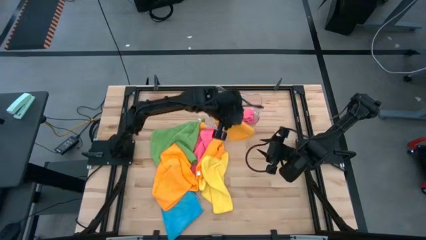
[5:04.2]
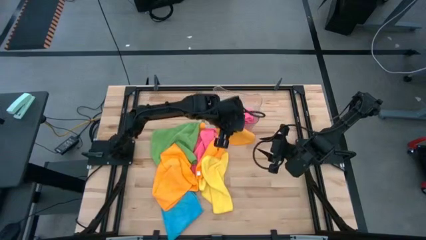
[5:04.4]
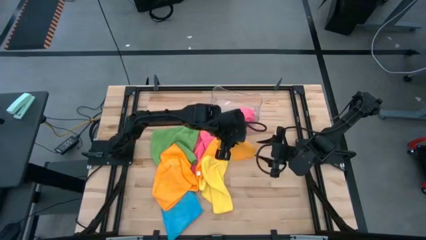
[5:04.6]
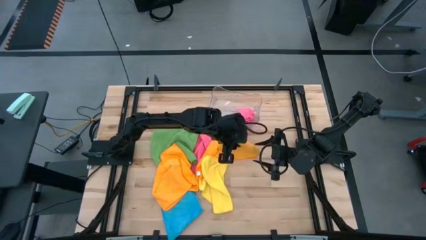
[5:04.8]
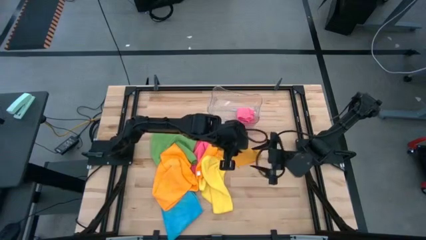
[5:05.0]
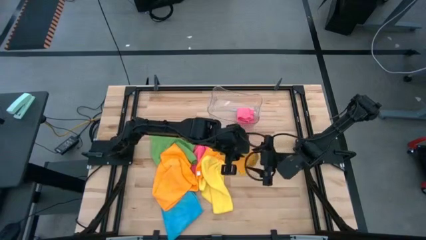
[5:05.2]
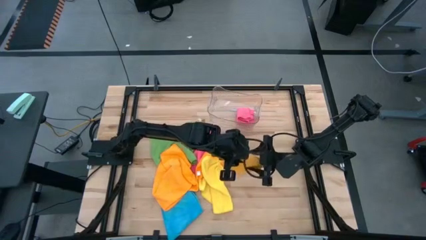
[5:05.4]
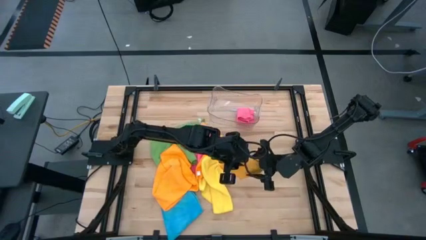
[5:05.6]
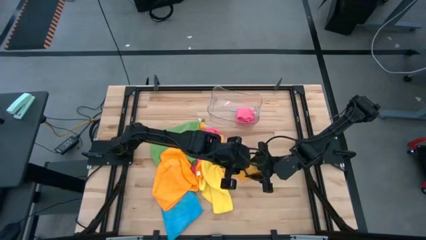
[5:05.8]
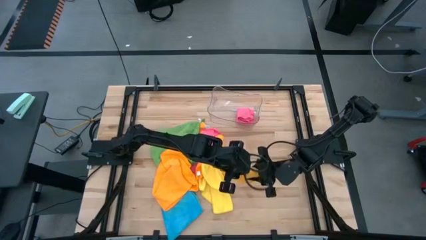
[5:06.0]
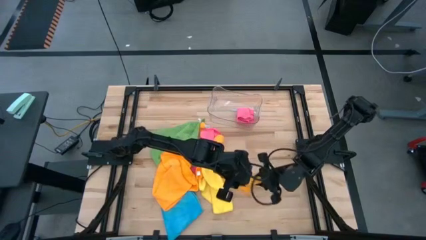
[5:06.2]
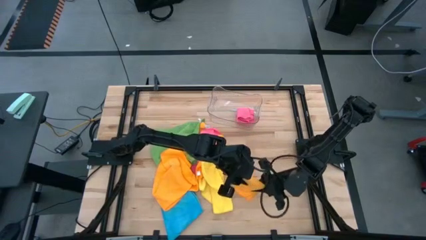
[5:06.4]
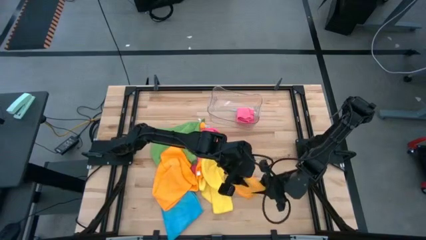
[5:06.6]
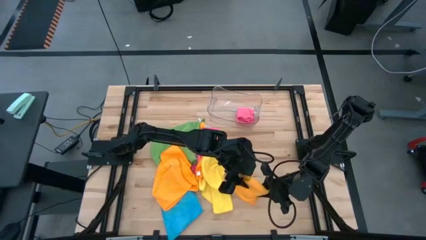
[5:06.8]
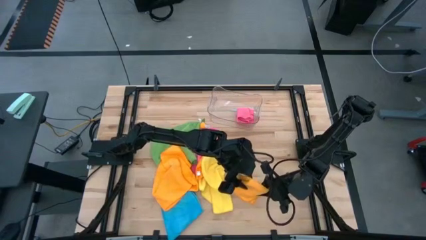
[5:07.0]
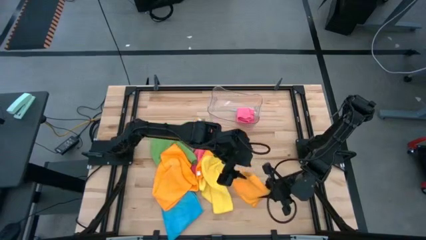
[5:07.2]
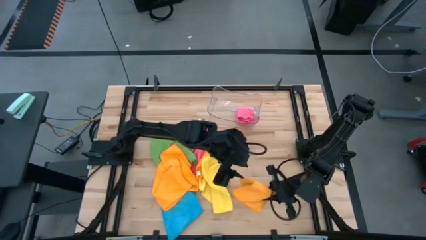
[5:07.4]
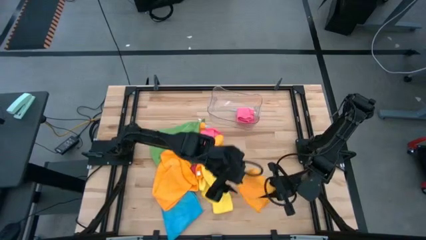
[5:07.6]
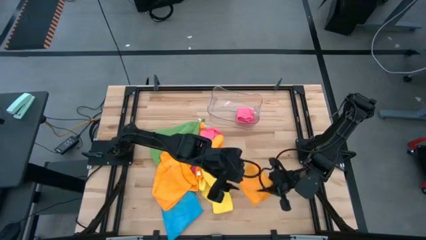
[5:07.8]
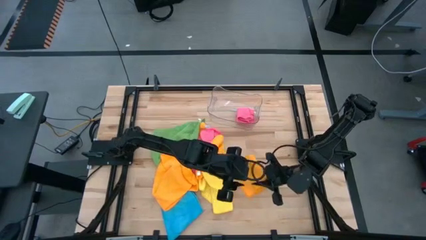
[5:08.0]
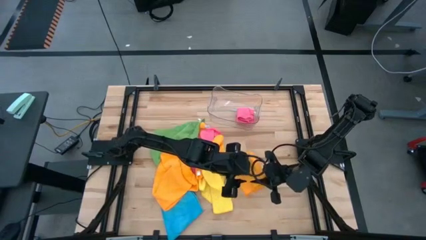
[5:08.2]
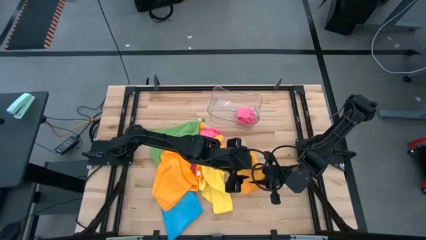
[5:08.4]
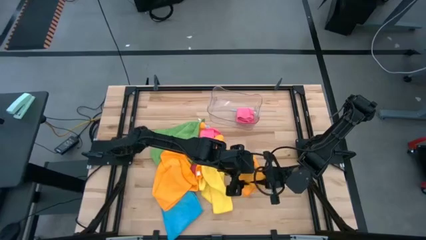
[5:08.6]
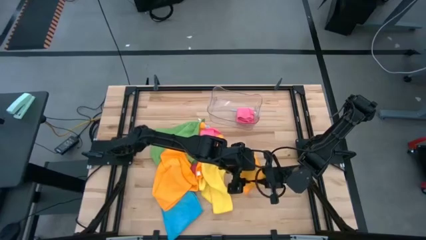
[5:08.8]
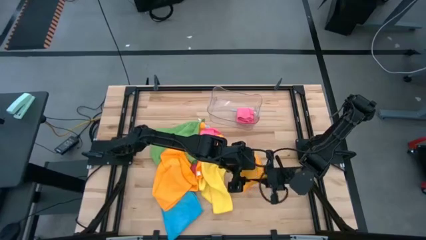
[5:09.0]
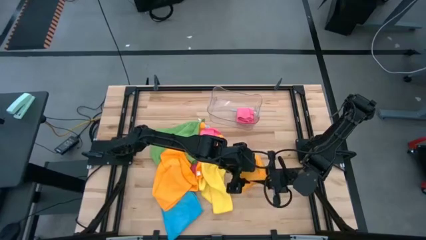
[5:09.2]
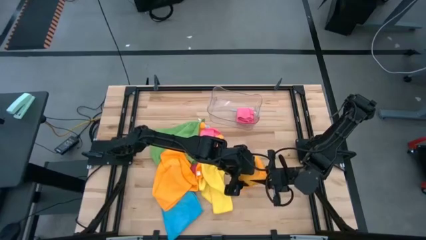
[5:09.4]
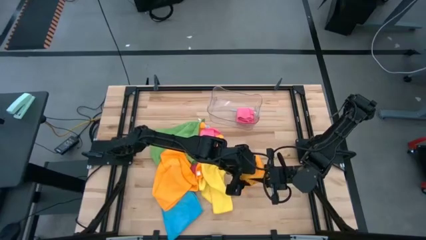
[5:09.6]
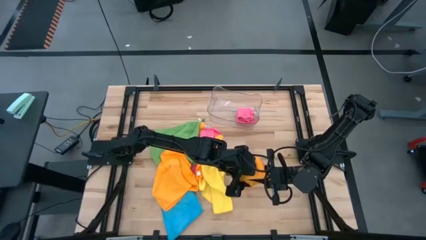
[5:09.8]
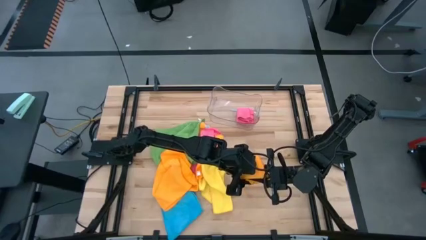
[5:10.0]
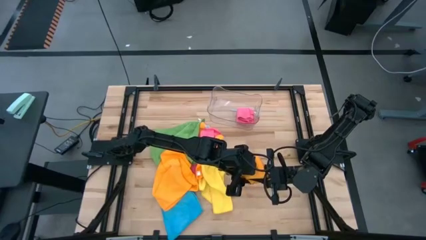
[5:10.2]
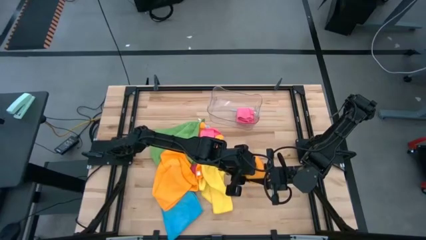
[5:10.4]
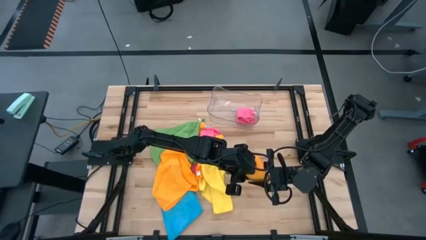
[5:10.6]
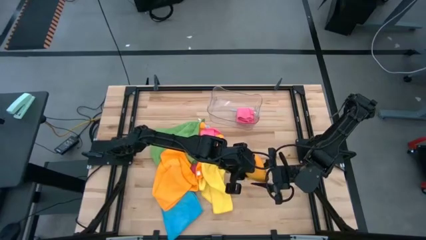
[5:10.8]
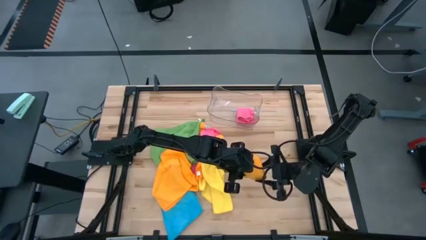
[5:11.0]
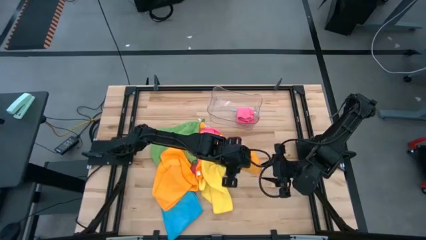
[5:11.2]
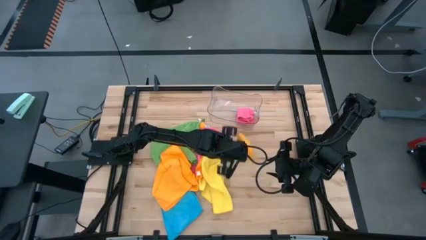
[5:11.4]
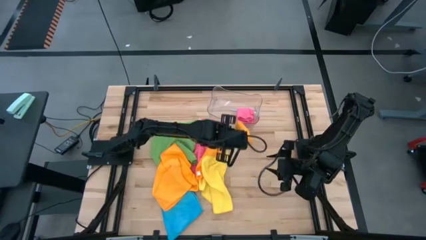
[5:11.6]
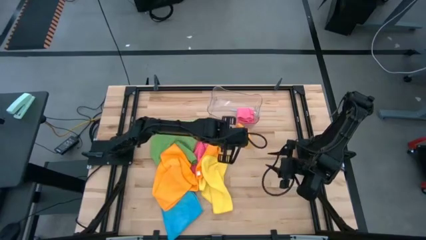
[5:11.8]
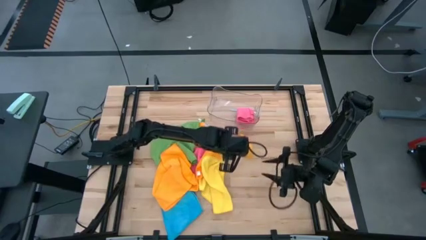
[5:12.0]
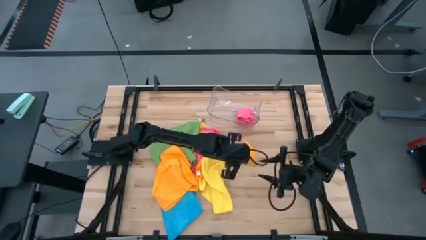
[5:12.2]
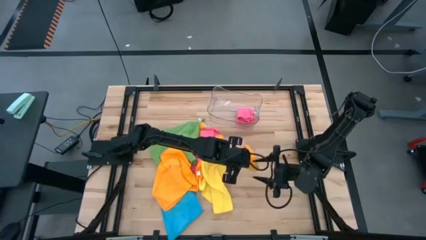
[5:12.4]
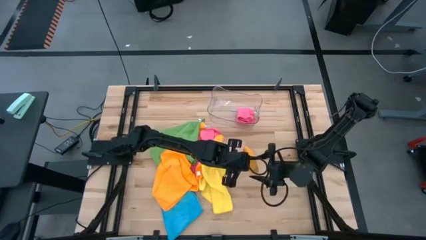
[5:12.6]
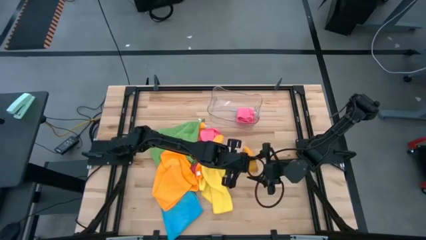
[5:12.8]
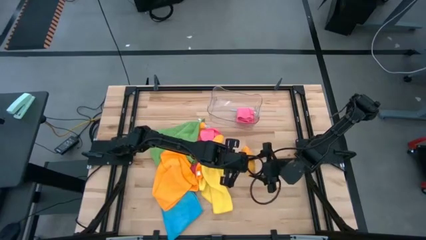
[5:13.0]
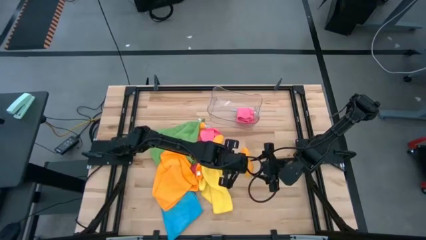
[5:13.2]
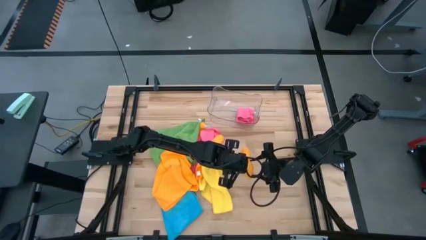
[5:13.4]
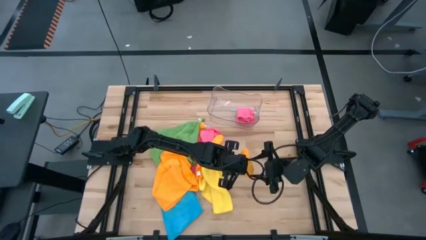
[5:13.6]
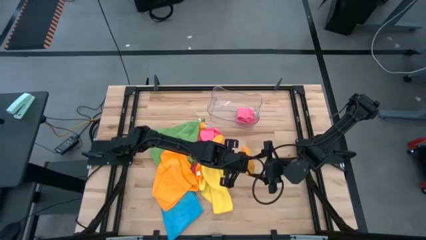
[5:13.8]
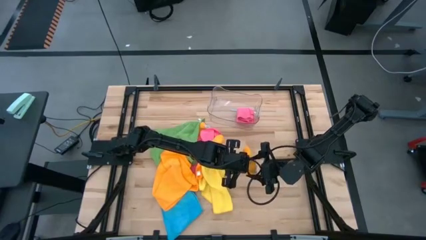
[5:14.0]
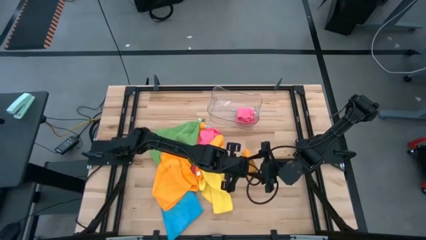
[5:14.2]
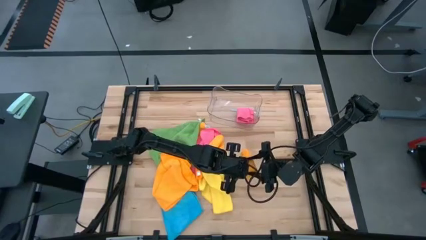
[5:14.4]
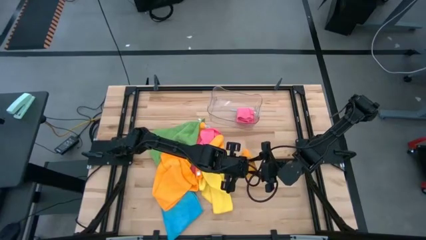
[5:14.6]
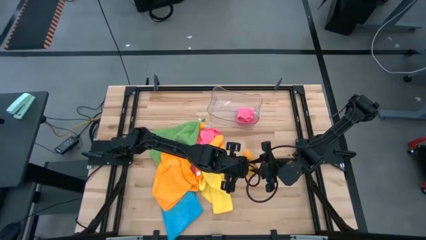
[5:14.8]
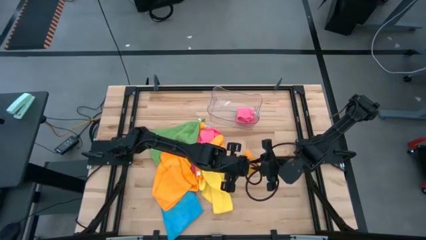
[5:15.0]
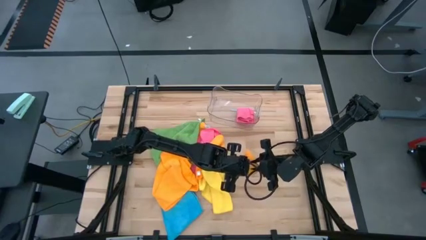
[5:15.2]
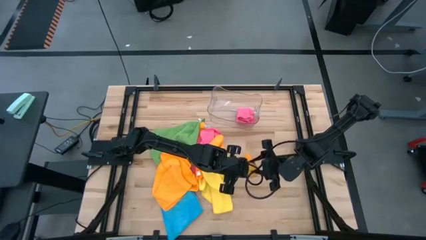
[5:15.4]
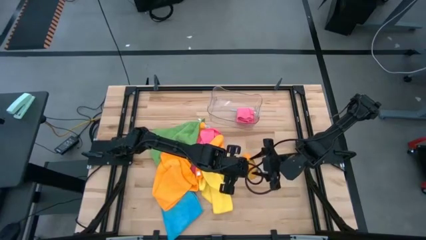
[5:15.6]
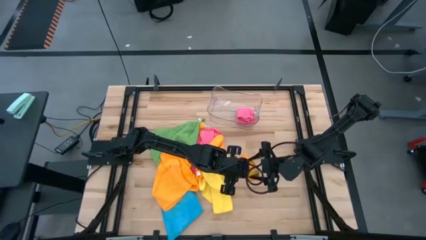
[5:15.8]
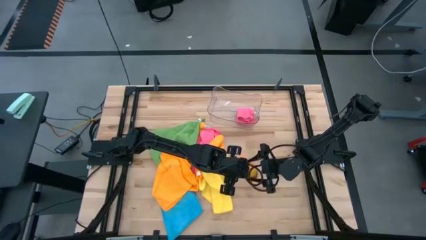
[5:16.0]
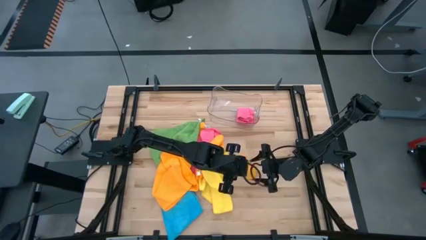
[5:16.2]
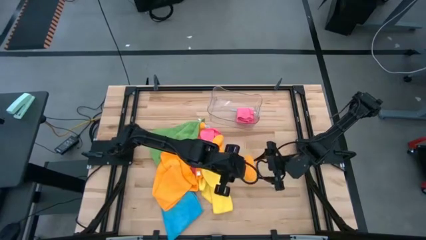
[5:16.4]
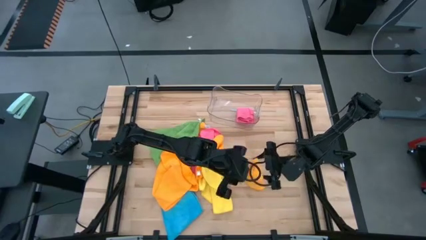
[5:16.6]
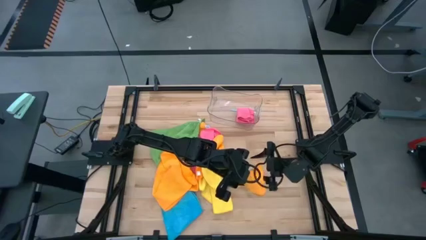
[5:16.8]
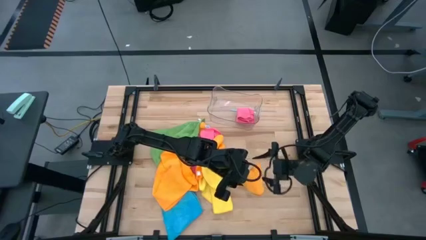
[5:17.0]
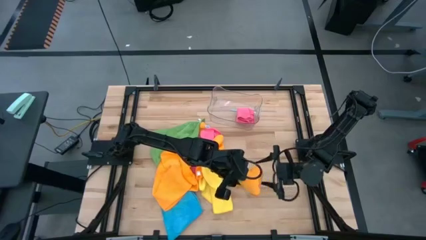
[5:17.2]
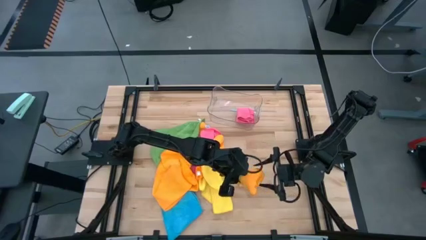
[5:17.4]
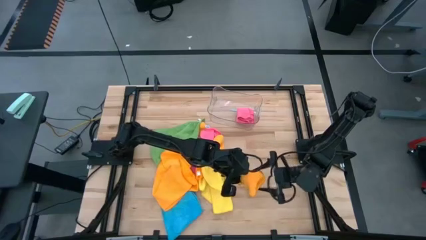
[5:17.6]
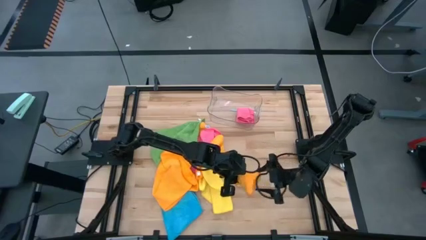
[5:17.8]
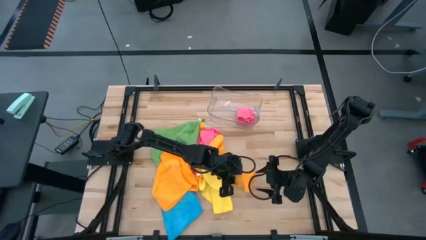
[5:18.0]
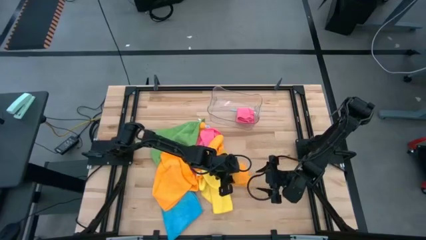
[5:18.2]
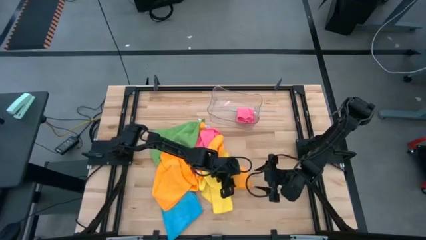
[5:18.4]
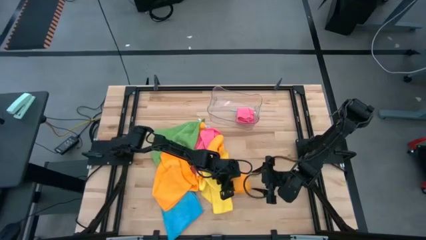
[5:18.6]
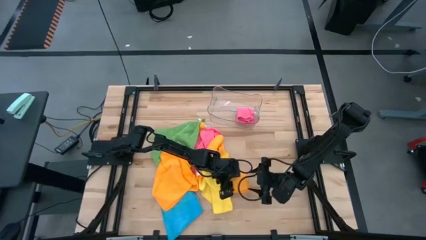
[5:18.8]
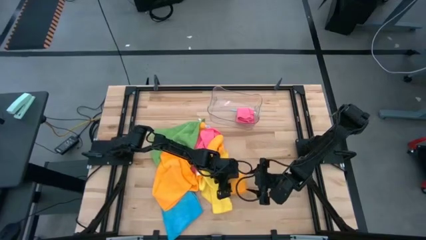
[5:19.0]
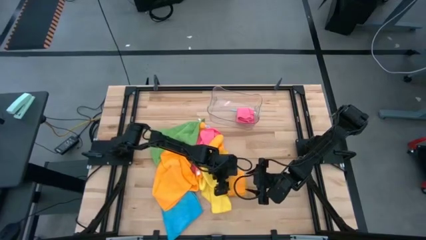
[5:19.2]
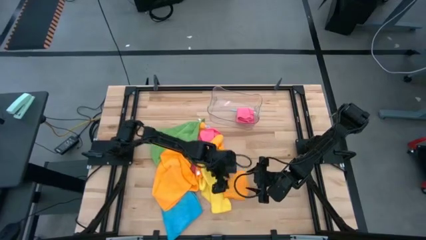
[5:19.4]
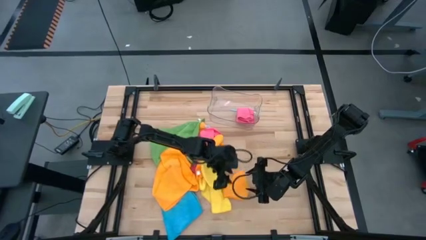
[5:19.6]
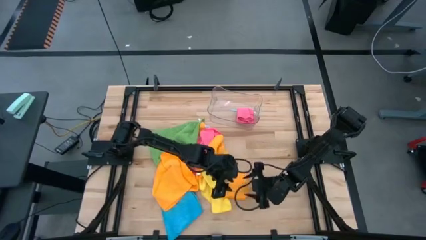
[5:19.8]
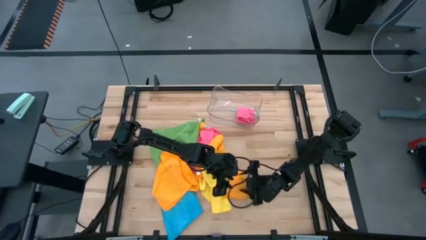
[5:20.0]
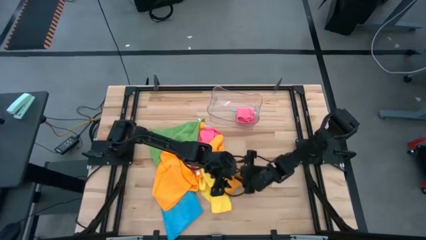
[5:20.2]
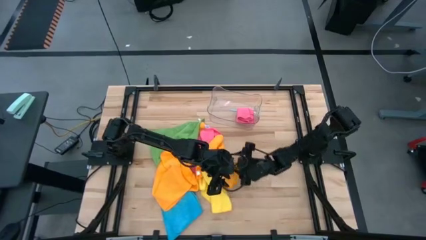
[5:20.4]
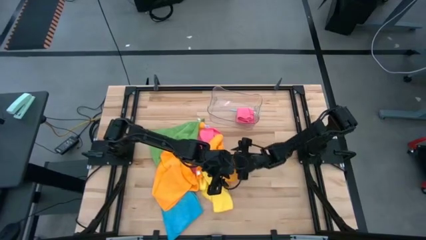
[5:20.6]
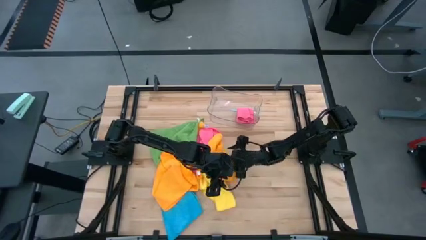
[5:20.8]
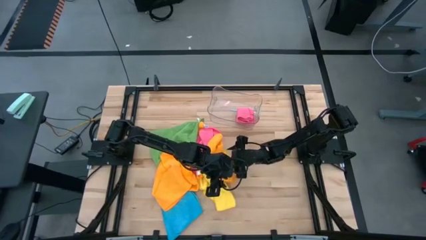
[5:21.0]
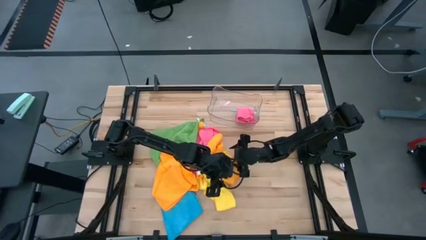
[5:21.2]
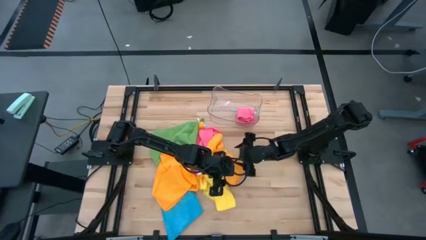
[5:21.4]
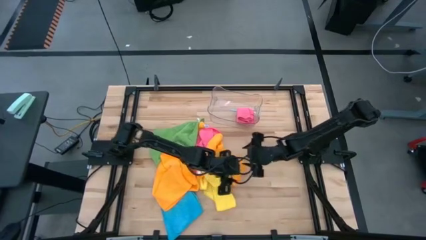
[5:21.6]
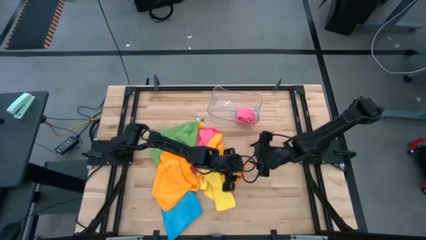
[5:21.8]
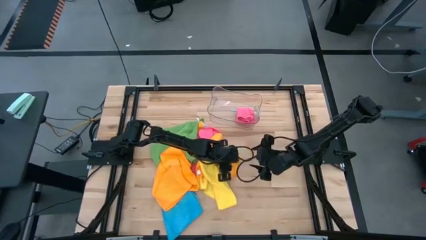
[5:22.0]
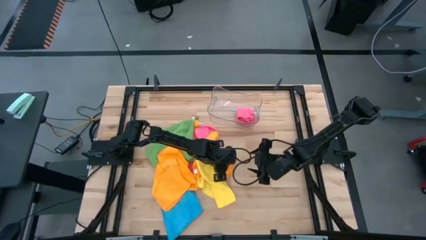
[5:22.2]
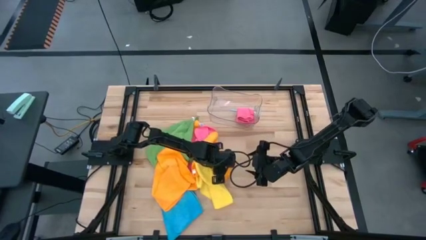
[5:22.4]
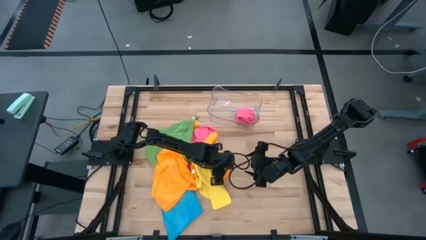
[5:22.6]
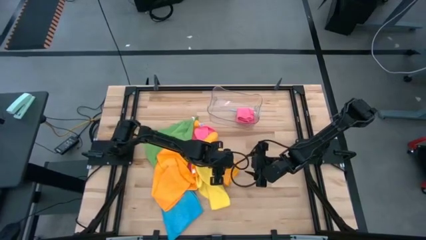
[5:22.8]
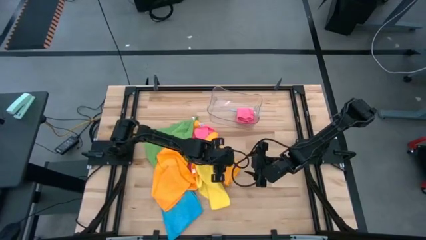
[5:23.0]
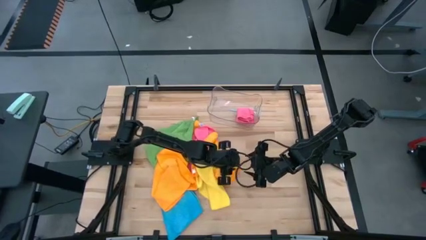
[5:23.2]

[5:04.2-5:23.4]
Task: Fold microfiber towels
Fold the right orange microfiber cloth
